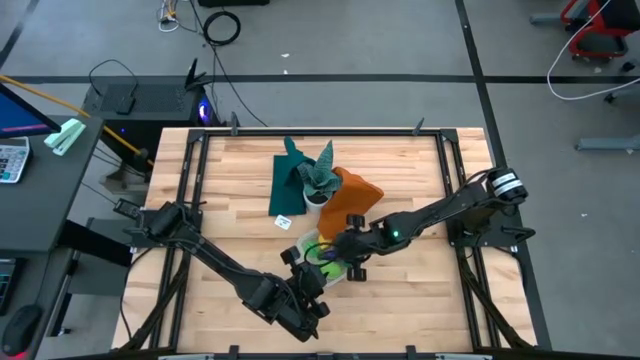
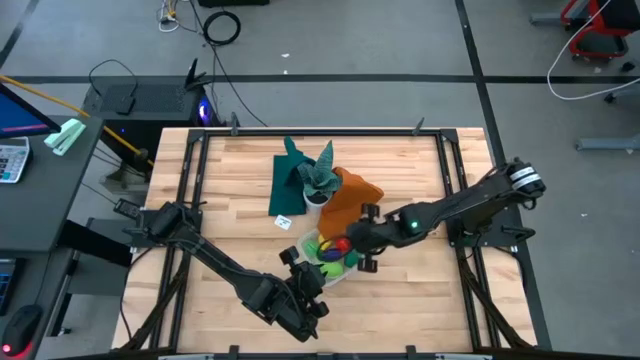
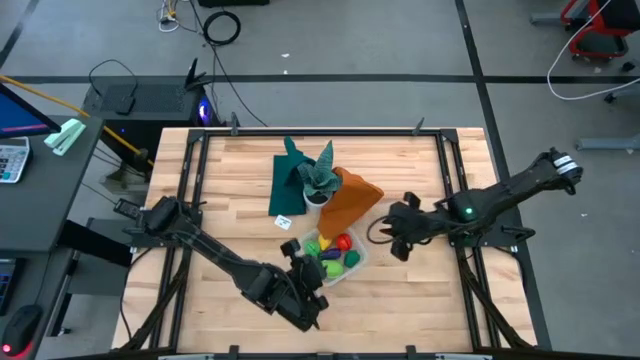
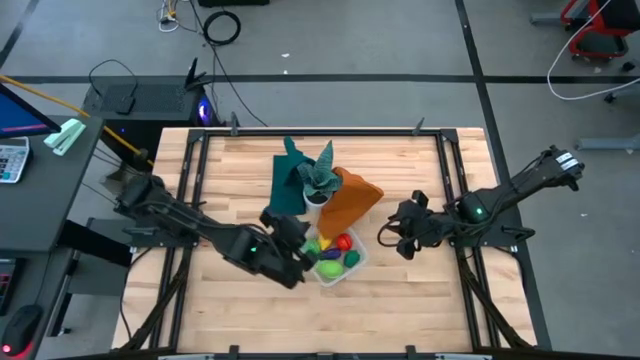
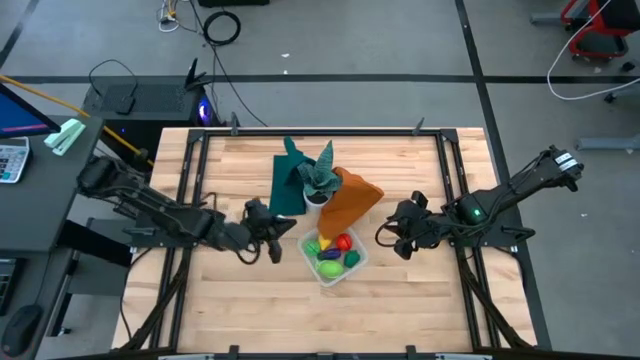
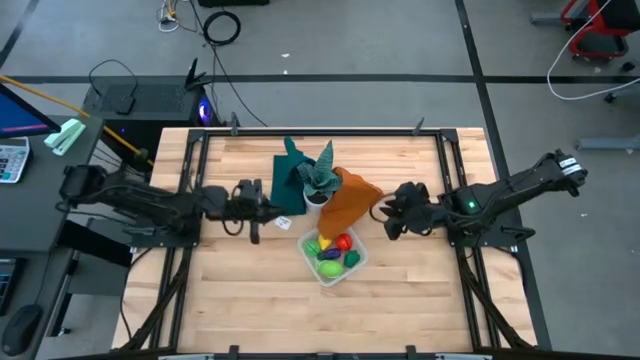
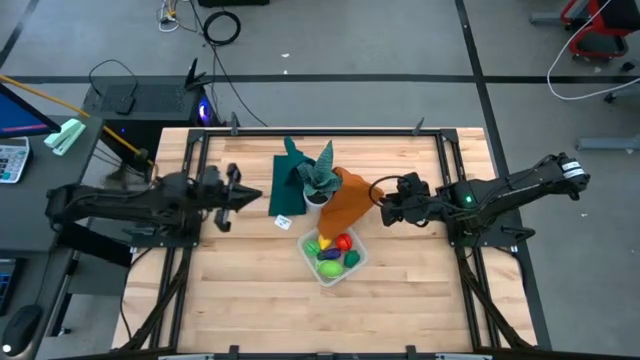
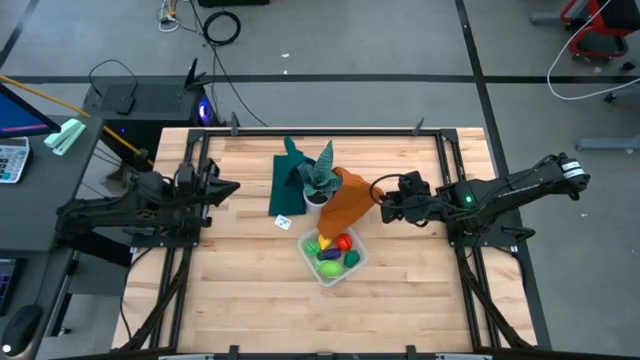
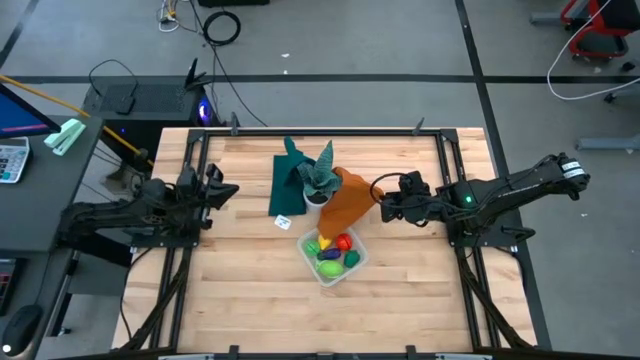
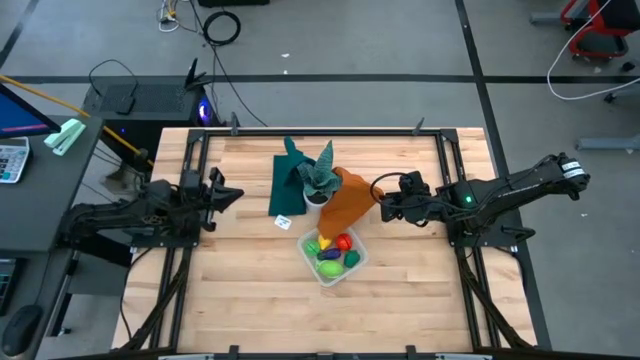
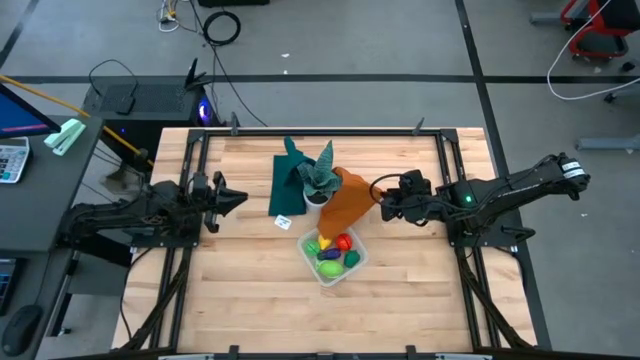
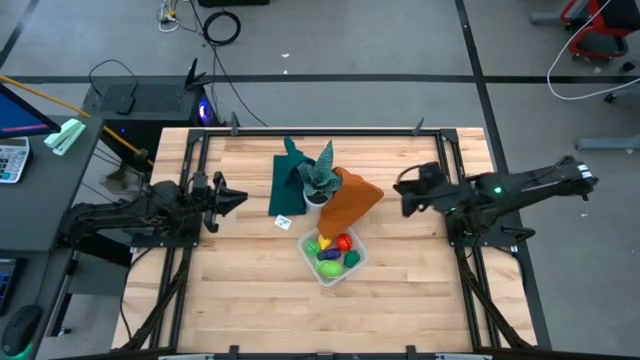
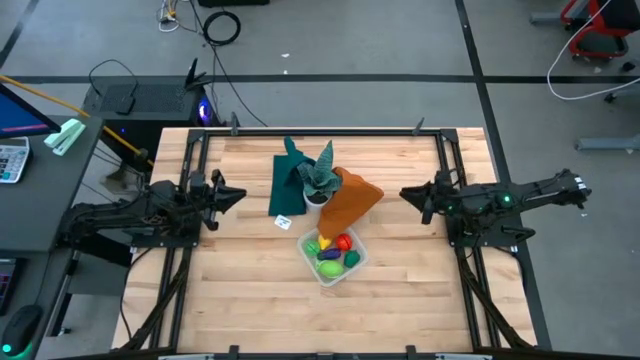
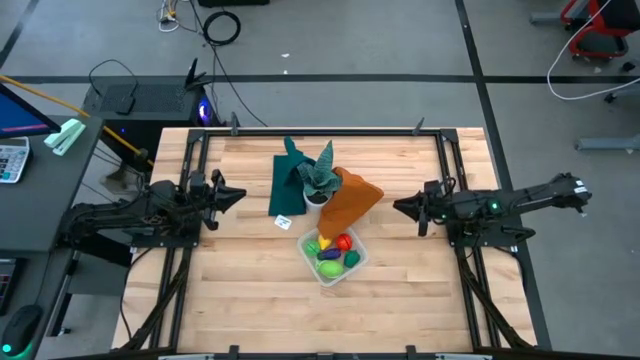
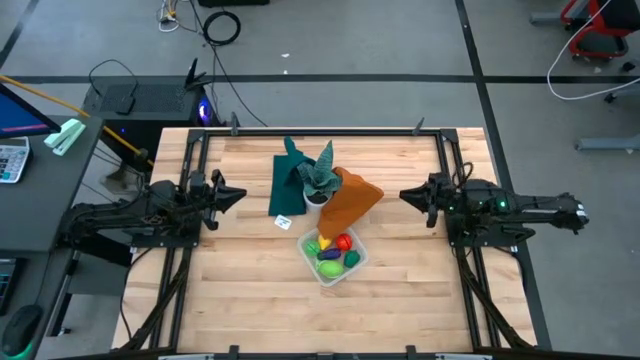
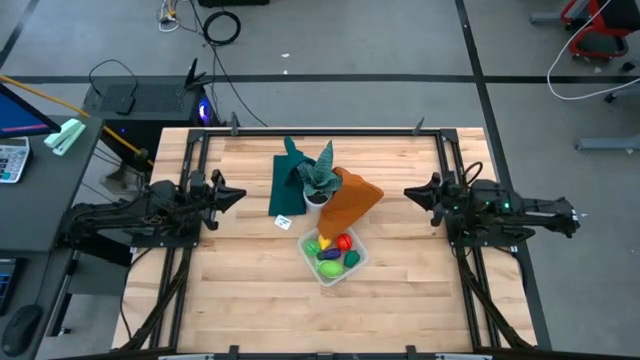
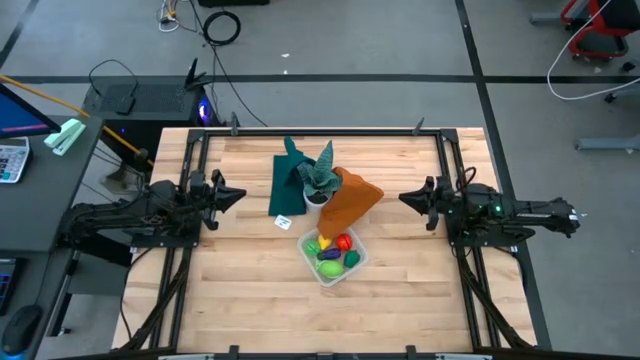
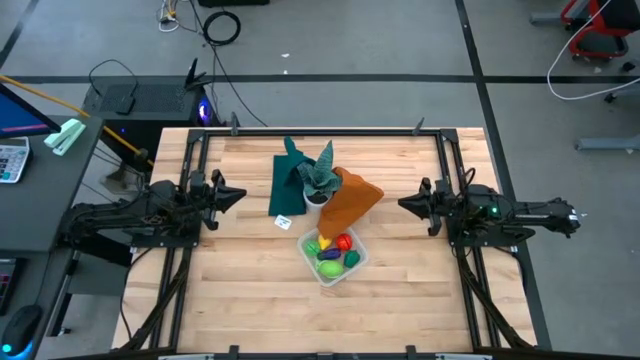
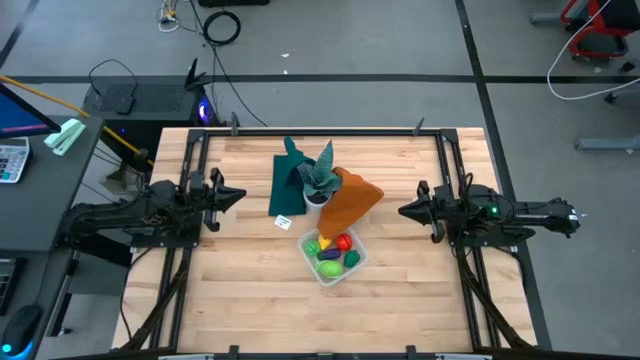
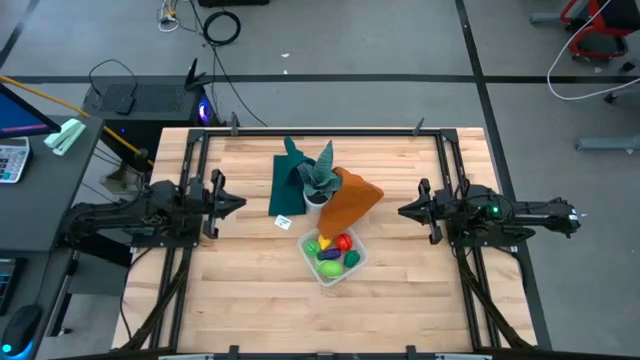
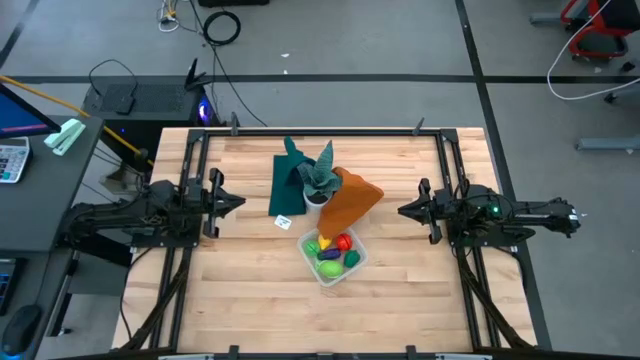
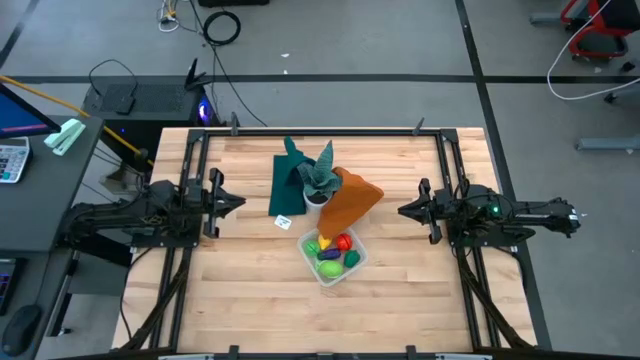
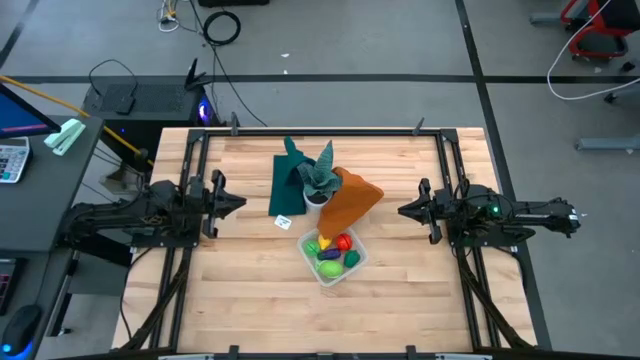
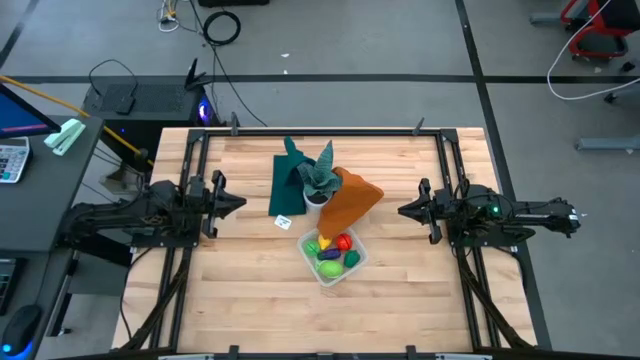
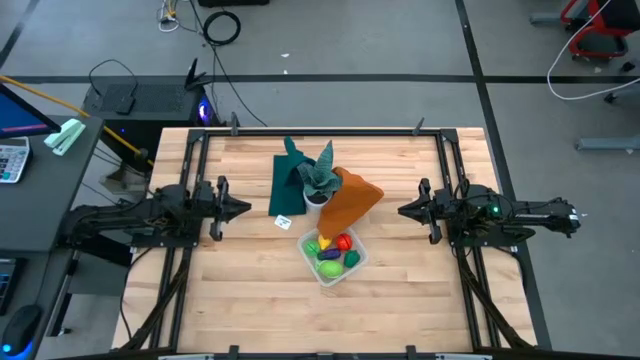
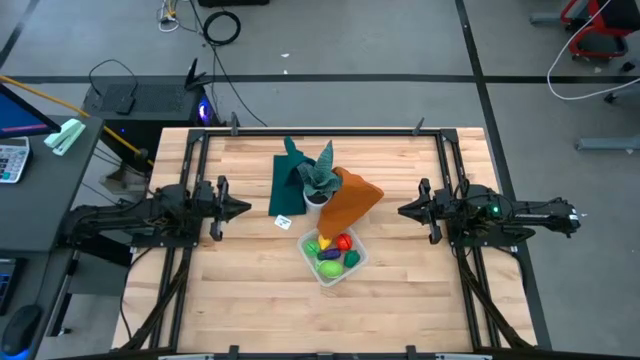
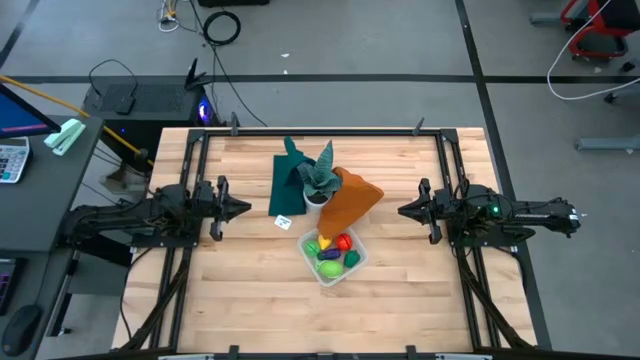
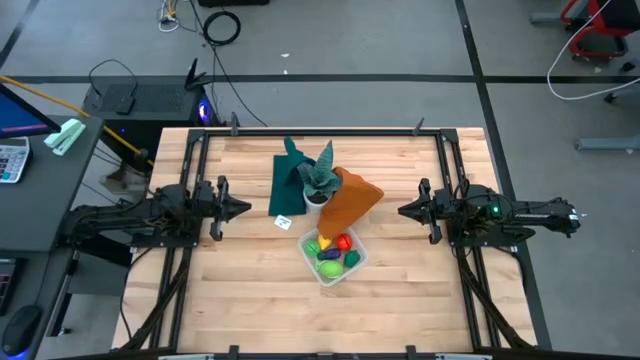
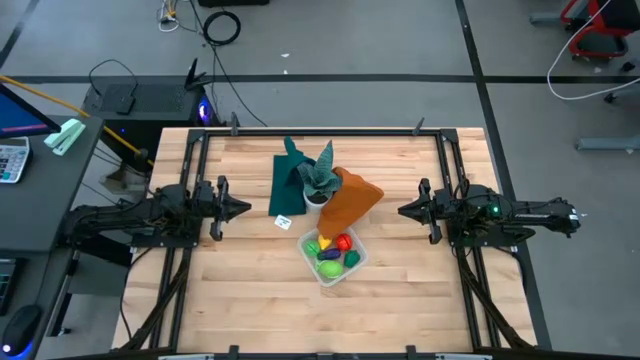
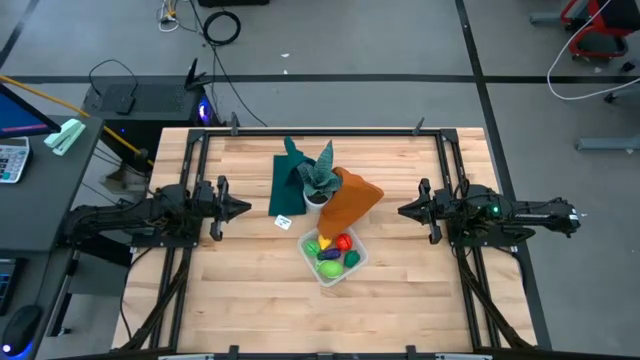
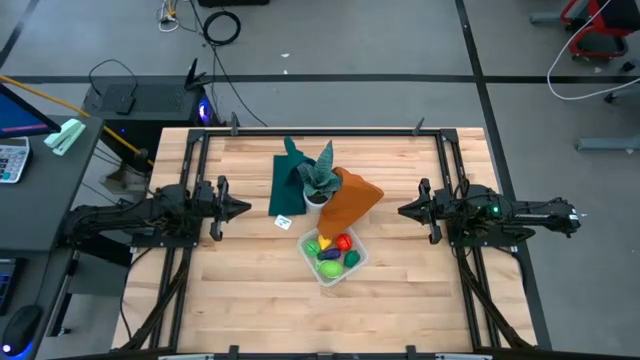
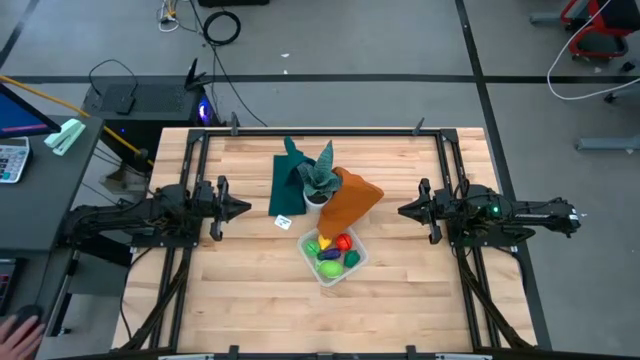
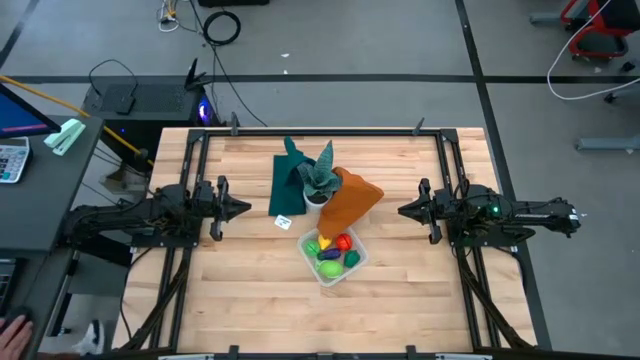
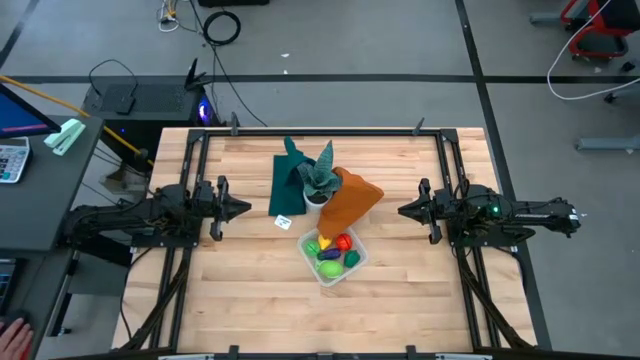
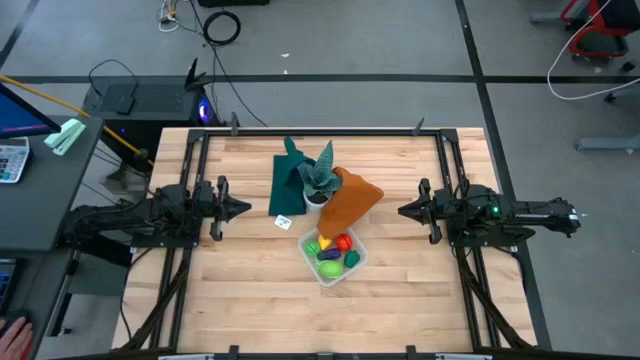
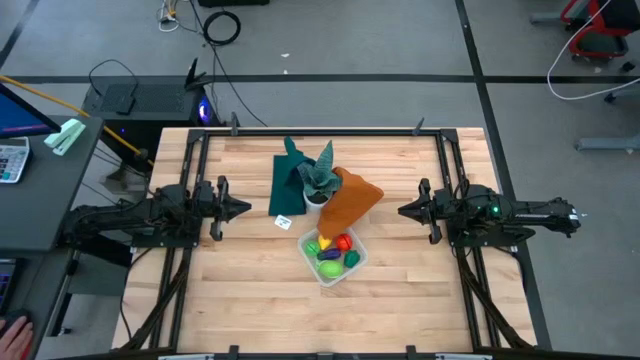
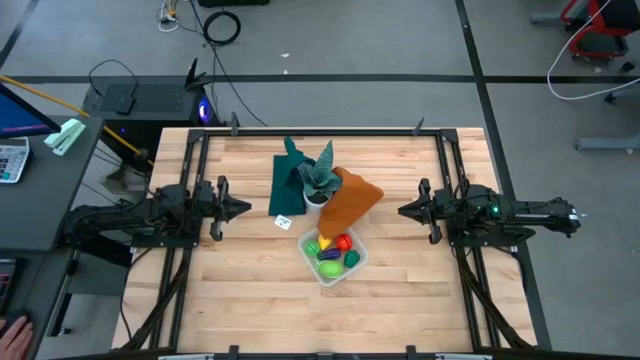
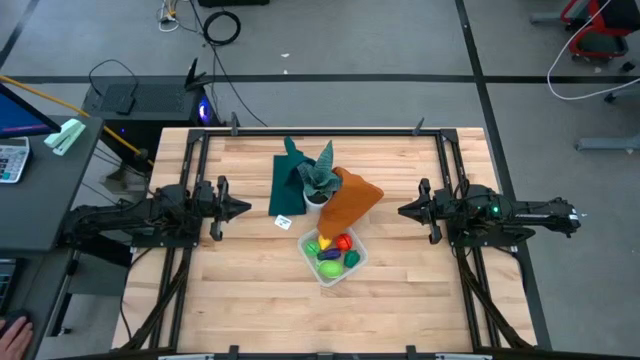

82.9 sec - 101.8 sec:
Task: Pick and placing Produce into tupperware
Return to Home Position
